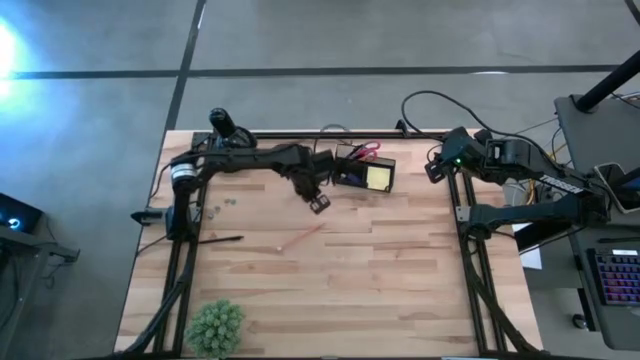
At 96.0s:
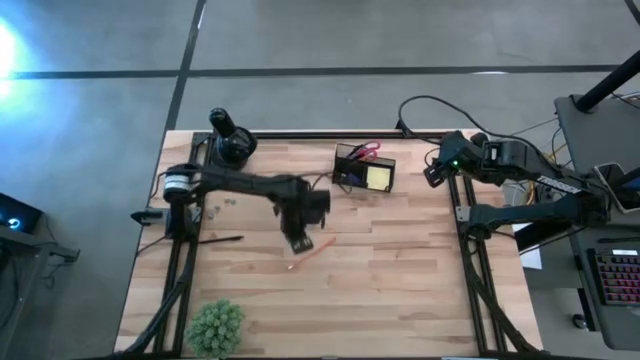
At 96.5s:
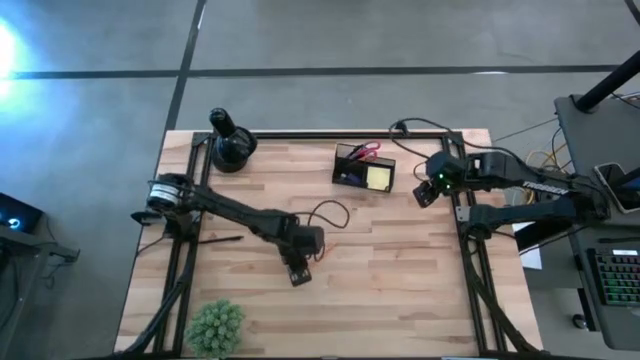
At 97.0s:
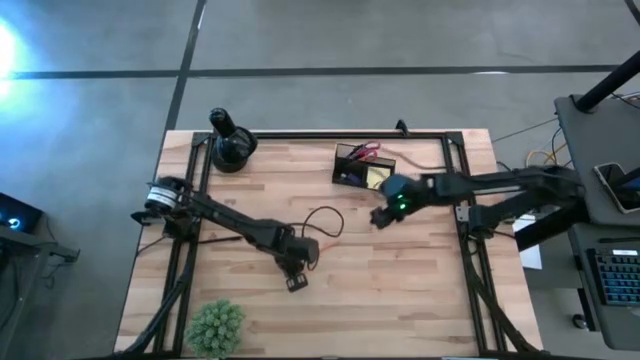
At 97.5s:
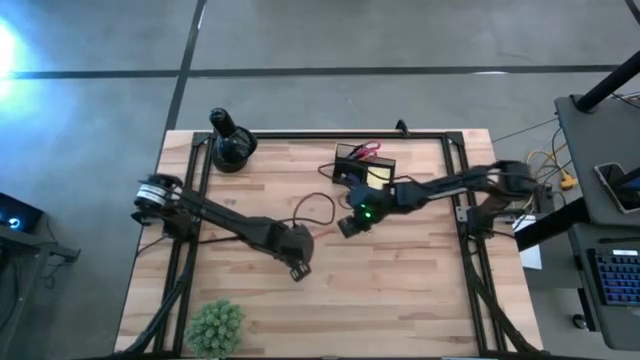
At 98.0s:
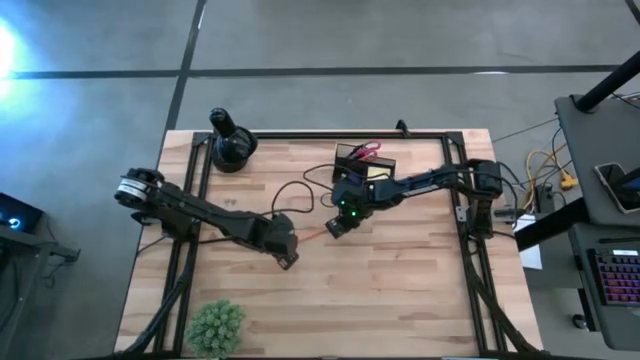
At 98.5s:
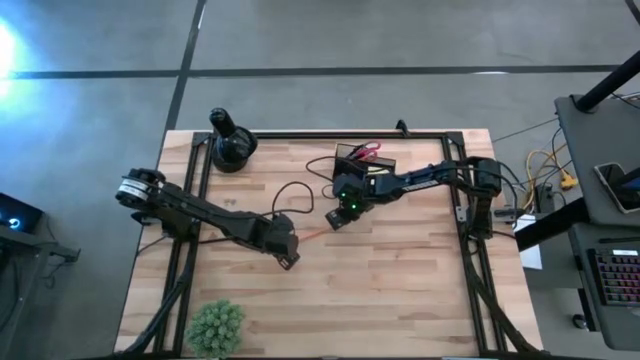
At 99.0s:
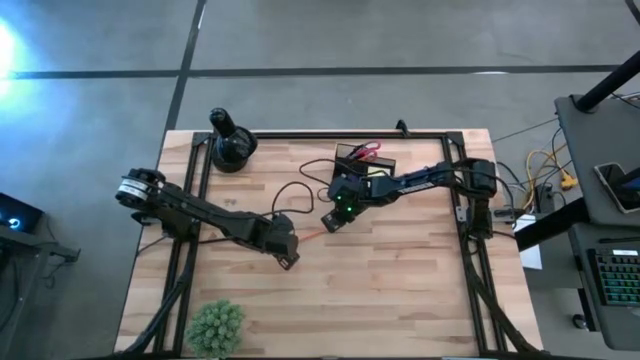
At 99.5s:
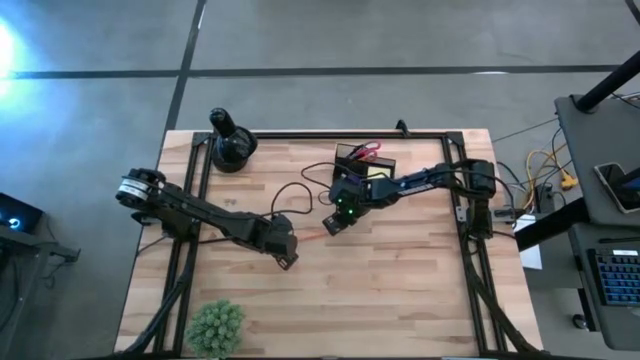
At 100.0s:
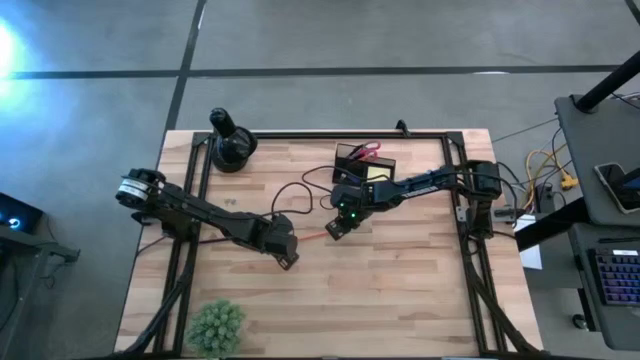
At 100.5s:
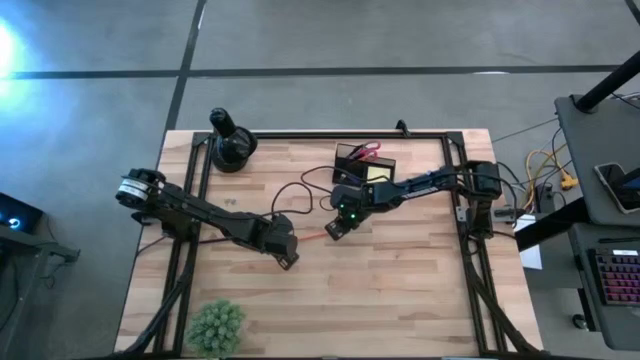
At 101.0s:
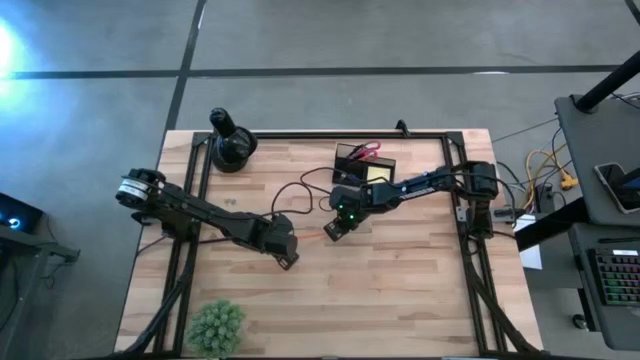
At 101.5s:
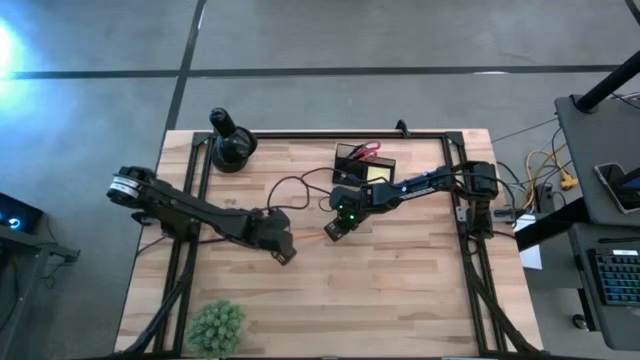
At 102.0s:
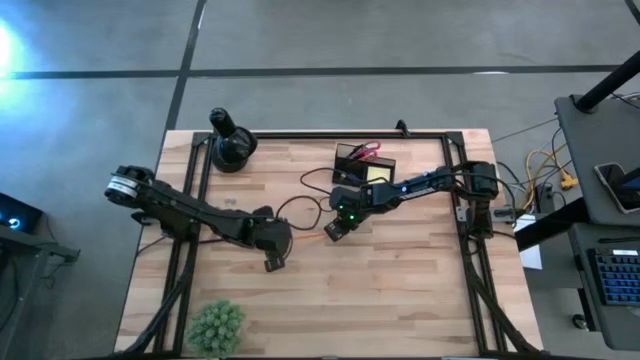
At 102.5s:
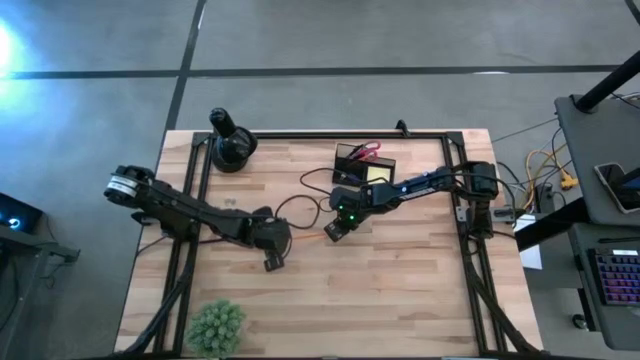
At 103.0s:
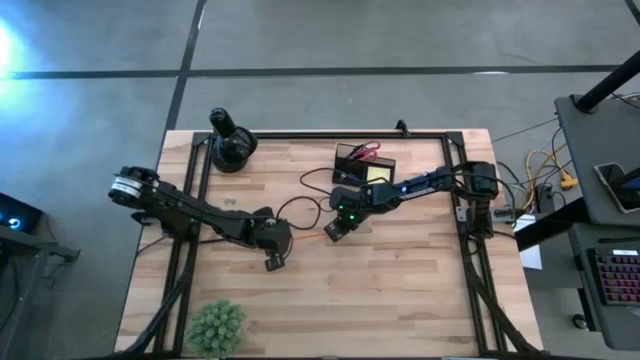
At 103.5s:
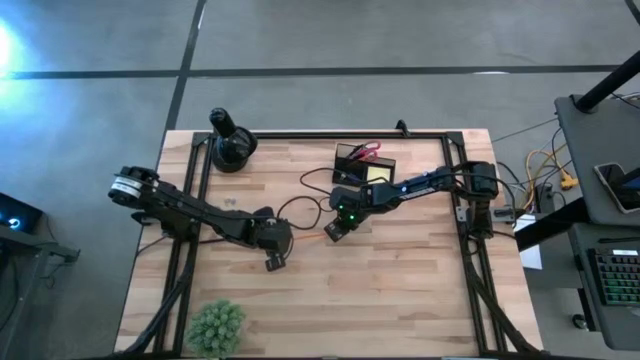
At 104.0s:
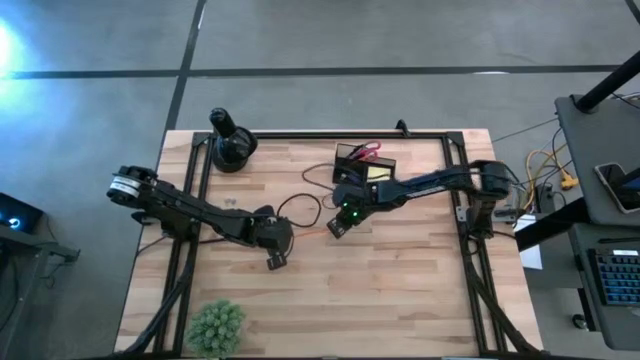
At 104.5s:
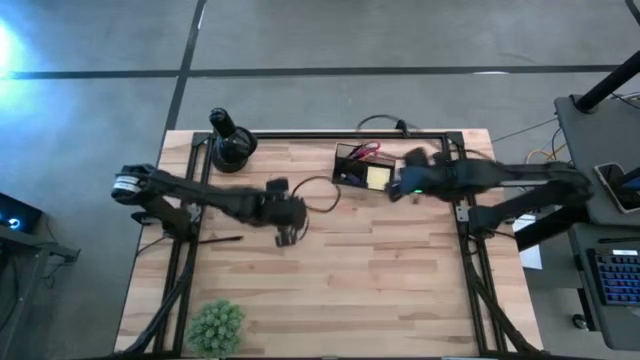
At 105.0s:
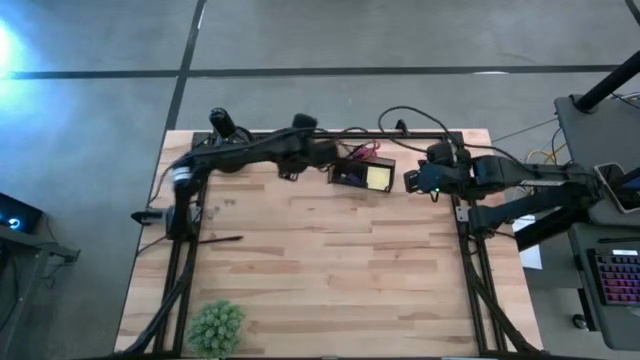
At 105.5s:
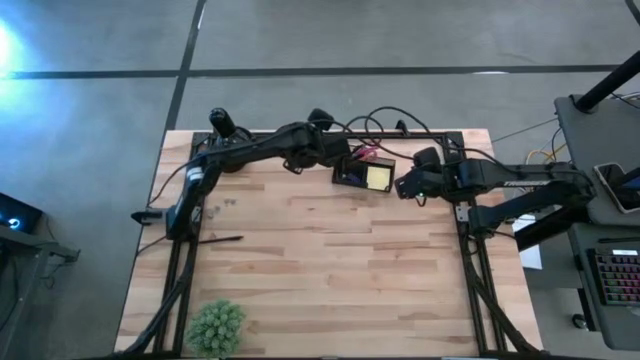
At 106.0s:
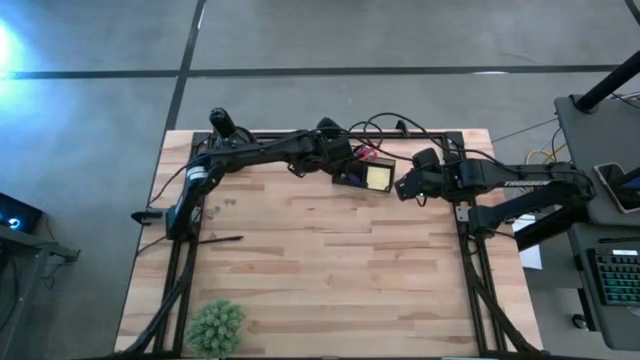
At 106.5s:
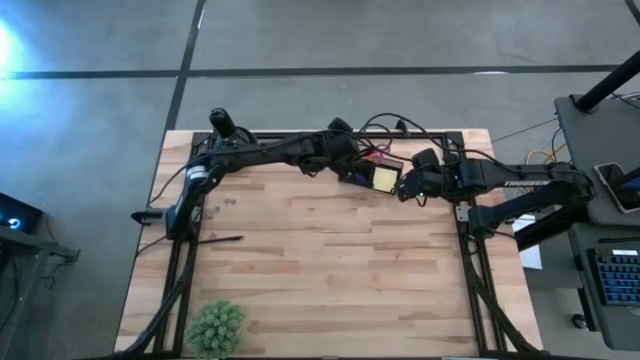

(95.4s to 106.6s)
Task: Pick and place office supplies into organizer
Put the pencil into the desk organizer

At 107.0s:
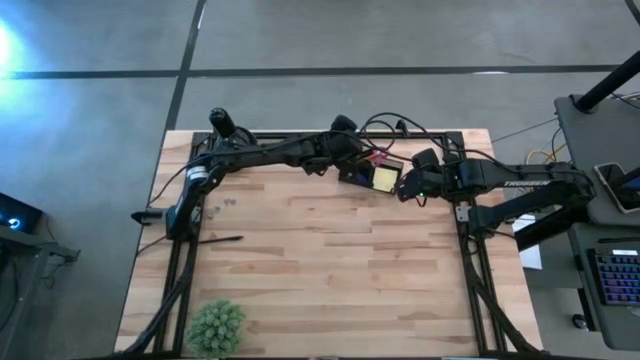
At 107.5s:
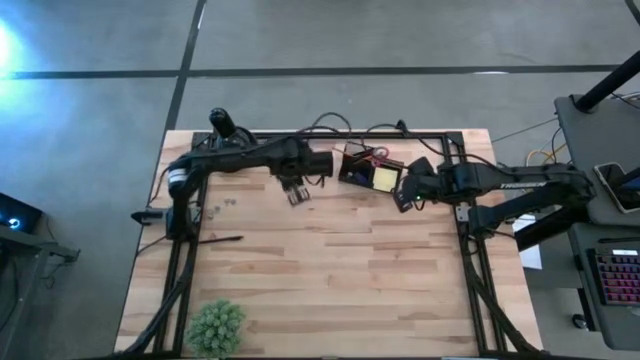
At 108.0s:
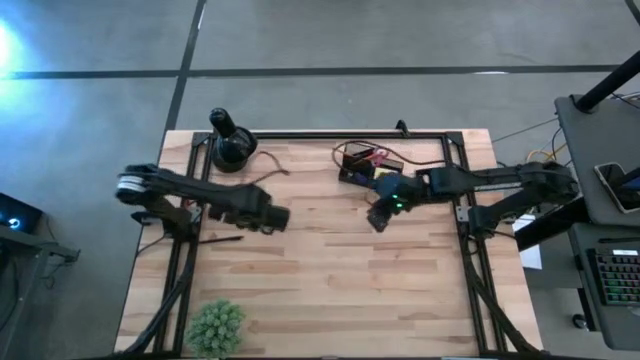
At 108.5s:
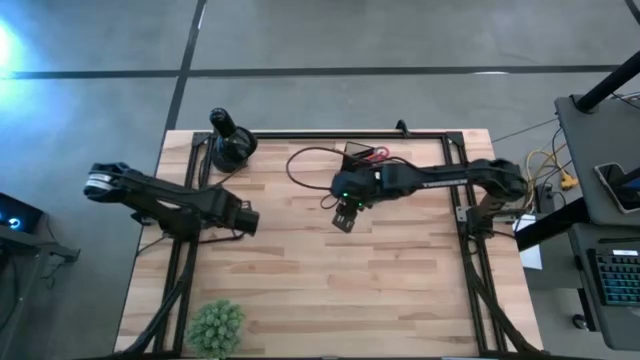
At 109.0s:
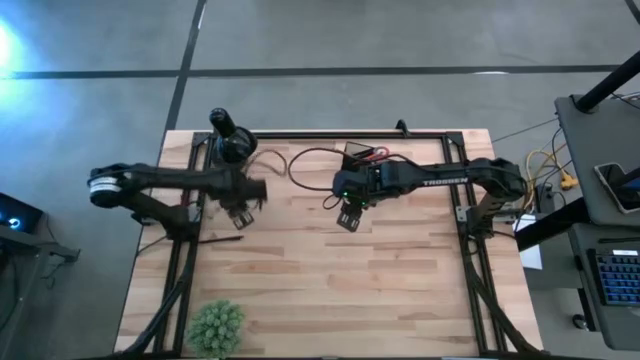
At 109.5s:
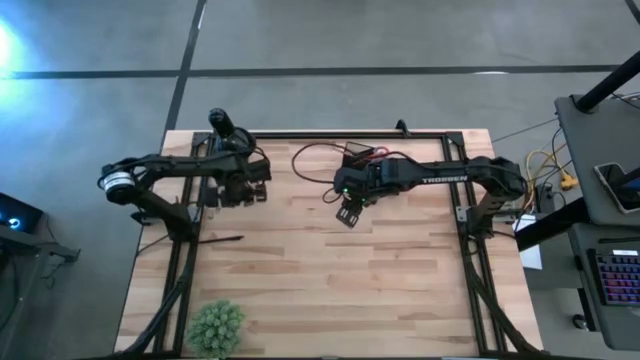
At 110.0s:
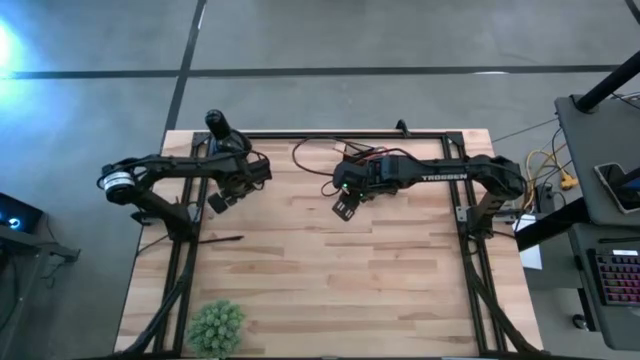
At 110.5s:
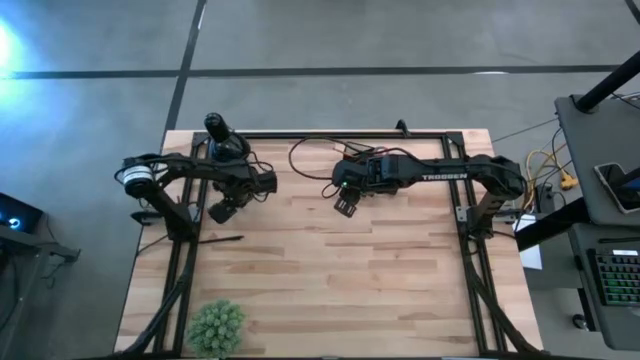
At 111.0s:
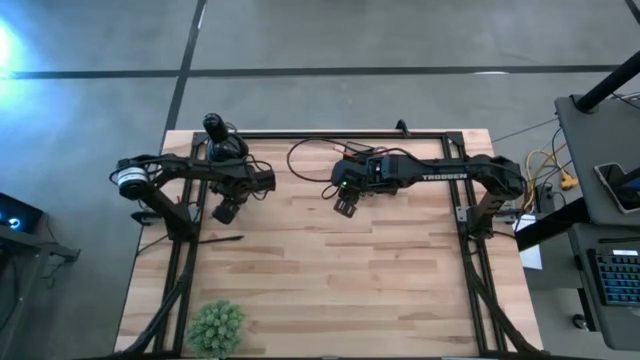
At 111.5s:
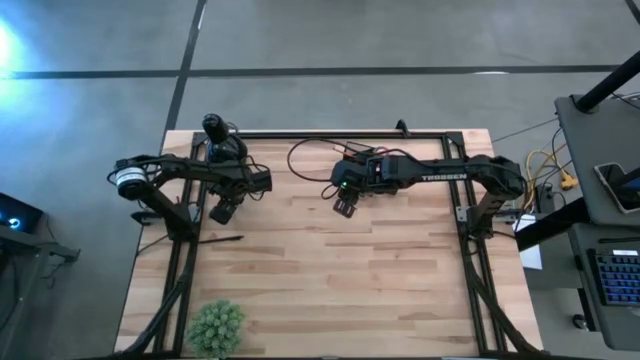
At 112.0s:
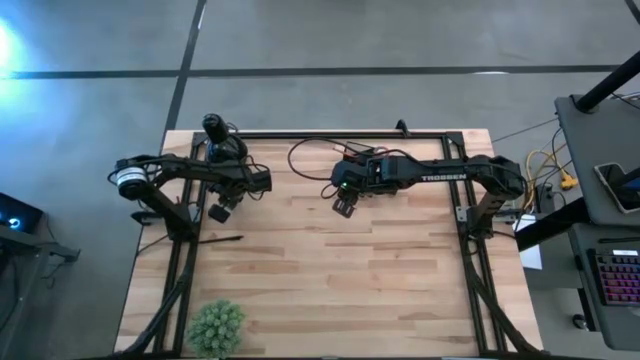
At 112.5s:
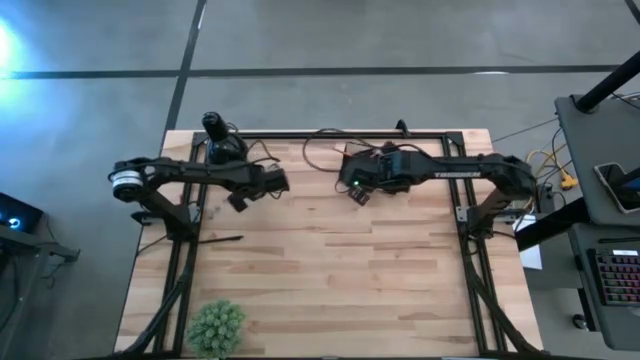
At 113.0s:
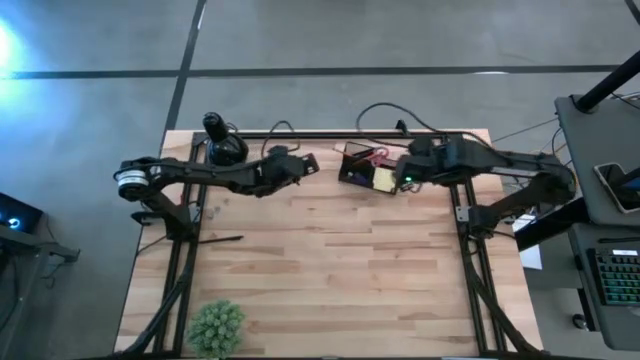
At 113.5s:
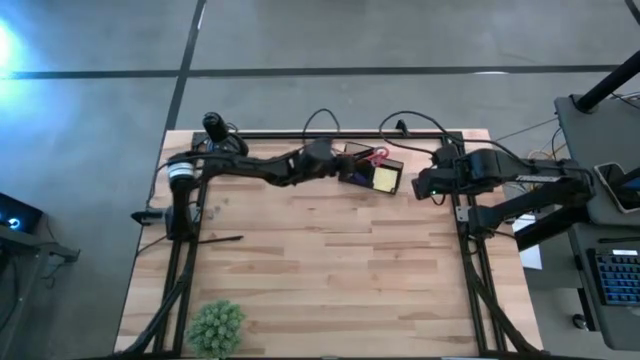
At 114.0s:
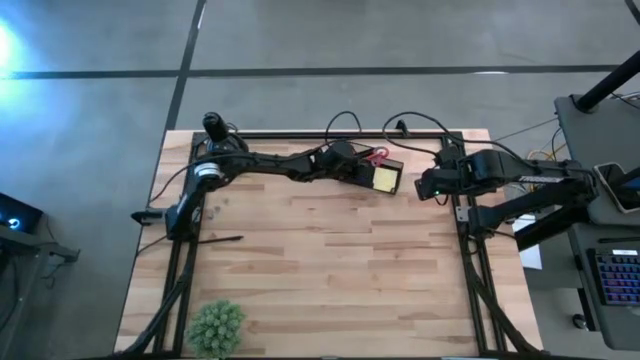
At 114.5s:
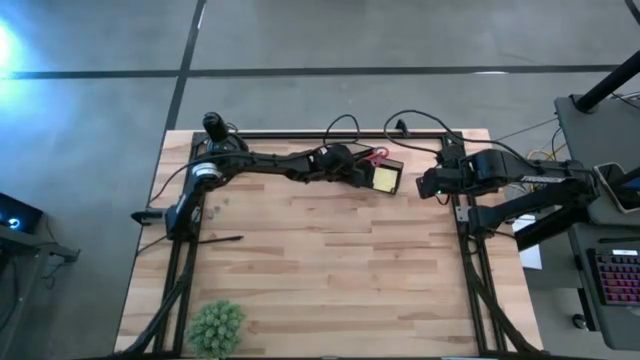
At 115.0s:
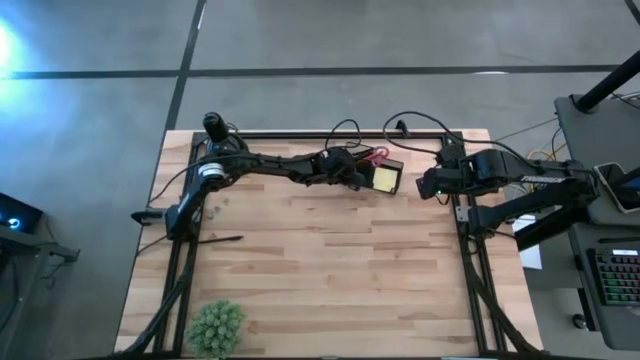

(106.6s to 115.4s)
Put the top blue binder clip into the desk organizer
